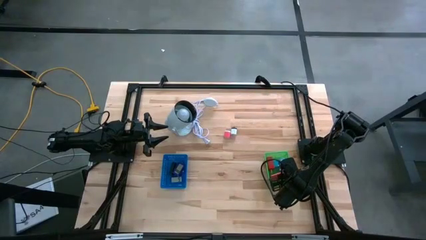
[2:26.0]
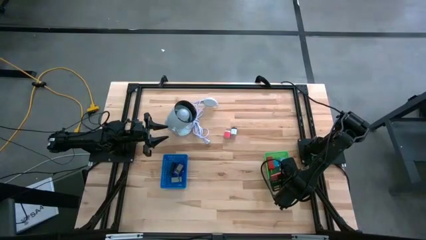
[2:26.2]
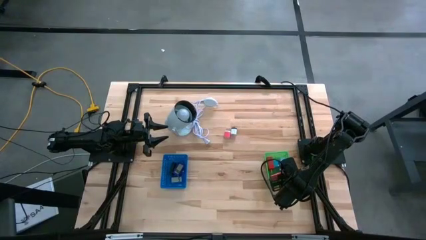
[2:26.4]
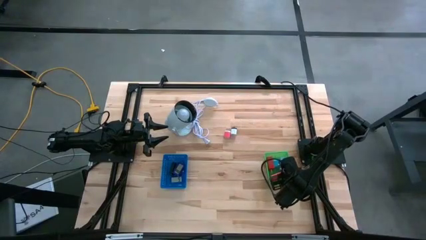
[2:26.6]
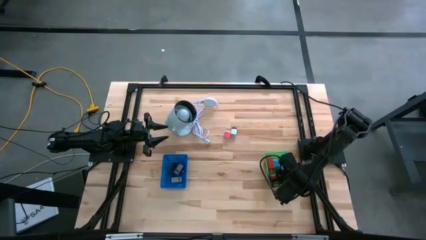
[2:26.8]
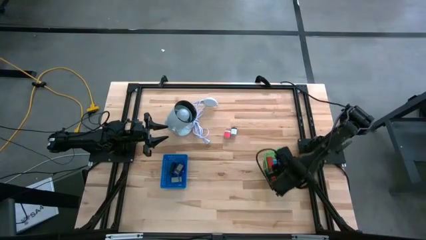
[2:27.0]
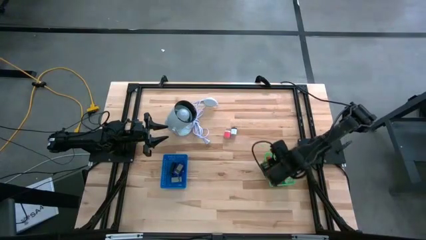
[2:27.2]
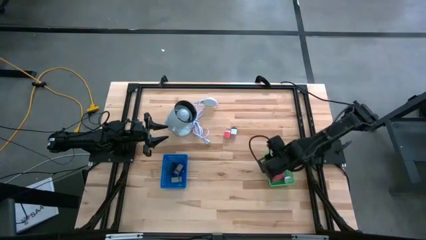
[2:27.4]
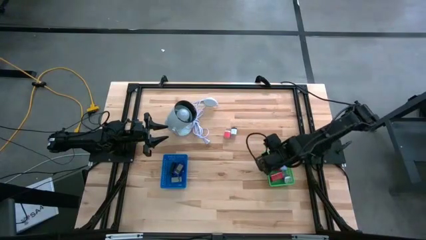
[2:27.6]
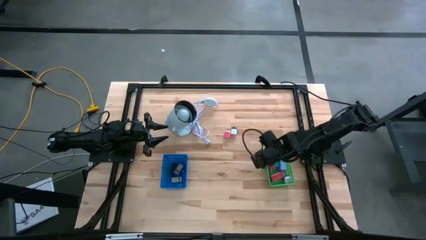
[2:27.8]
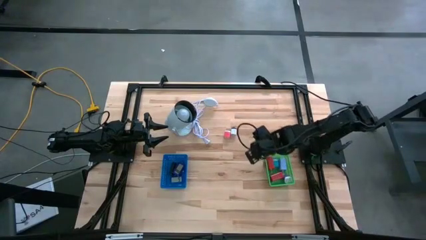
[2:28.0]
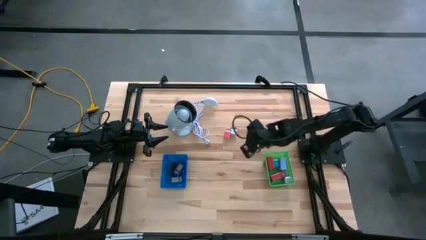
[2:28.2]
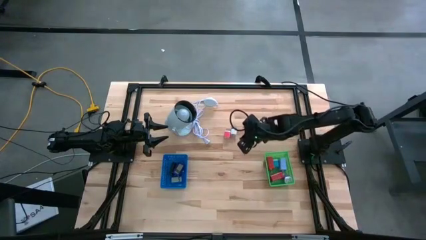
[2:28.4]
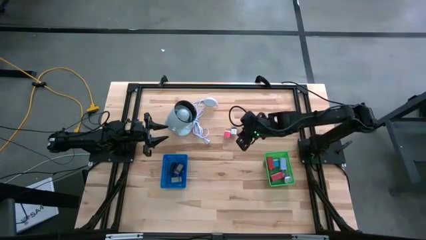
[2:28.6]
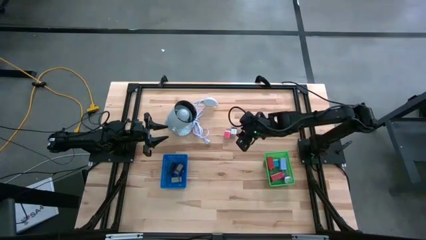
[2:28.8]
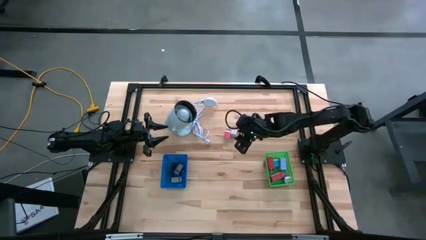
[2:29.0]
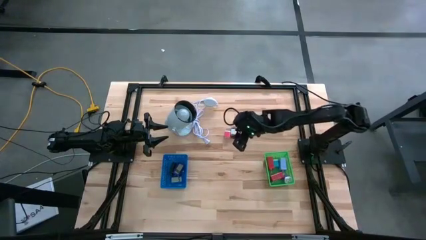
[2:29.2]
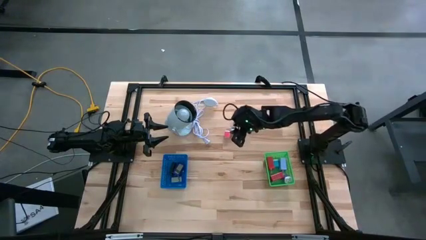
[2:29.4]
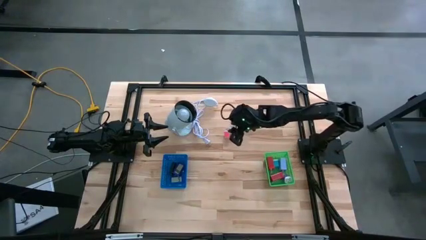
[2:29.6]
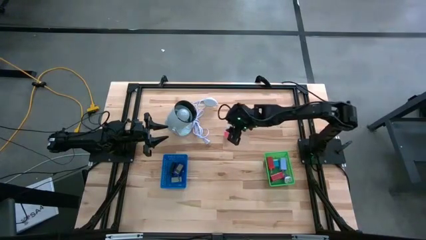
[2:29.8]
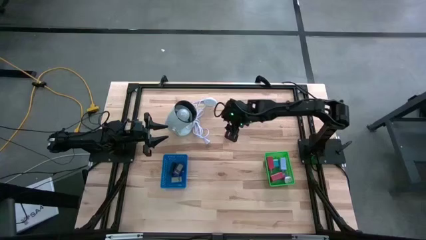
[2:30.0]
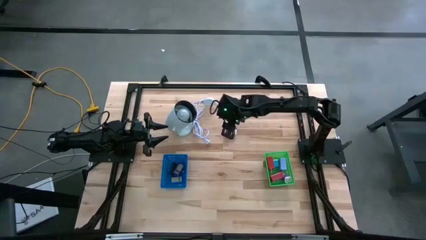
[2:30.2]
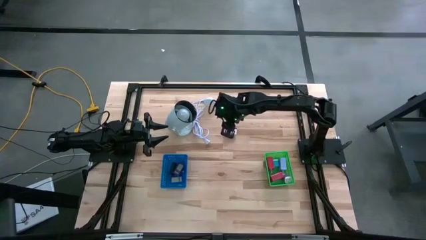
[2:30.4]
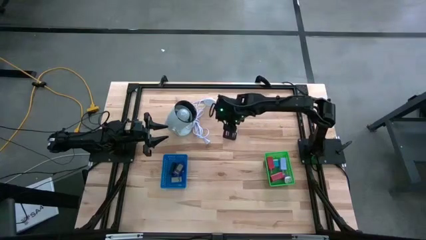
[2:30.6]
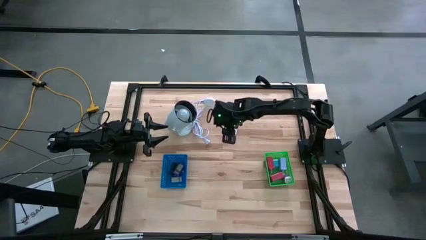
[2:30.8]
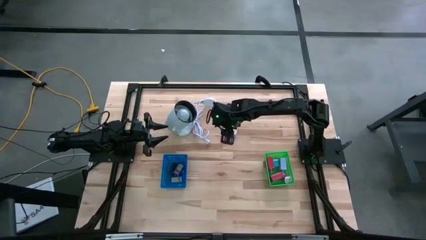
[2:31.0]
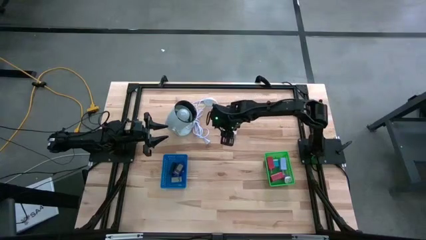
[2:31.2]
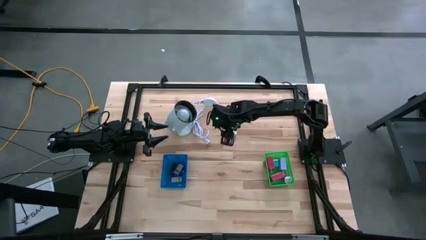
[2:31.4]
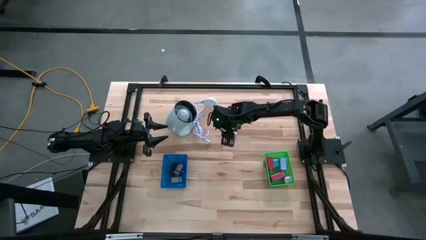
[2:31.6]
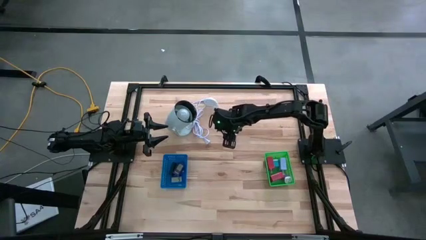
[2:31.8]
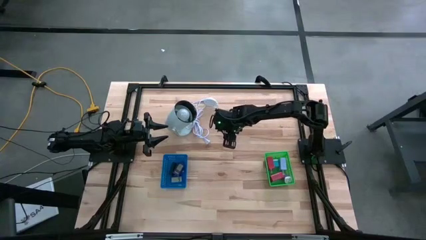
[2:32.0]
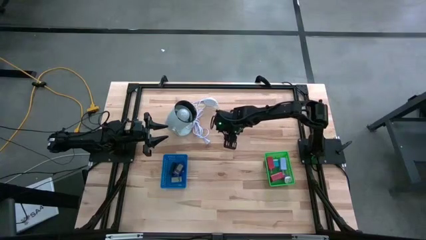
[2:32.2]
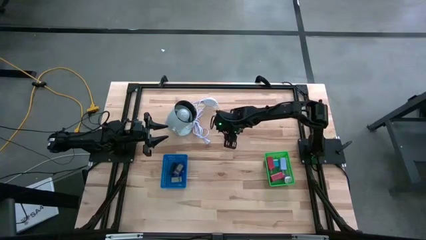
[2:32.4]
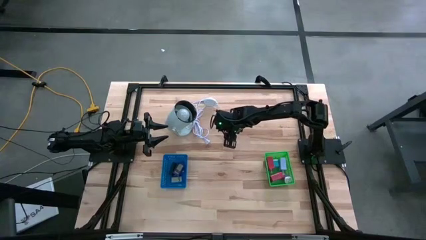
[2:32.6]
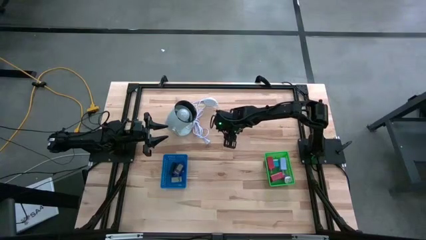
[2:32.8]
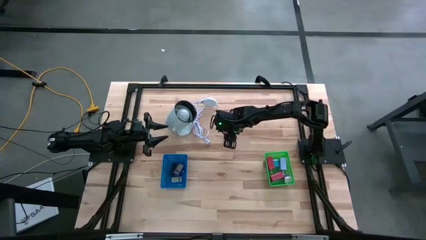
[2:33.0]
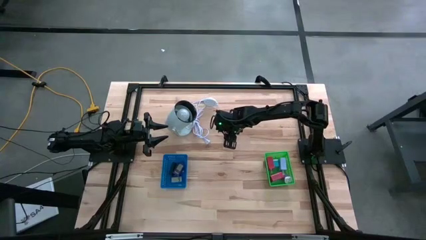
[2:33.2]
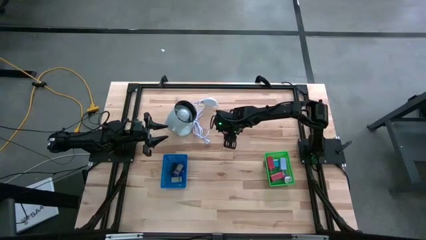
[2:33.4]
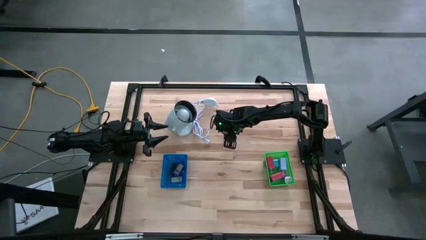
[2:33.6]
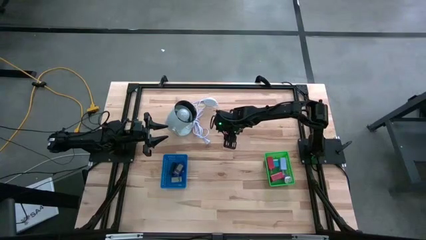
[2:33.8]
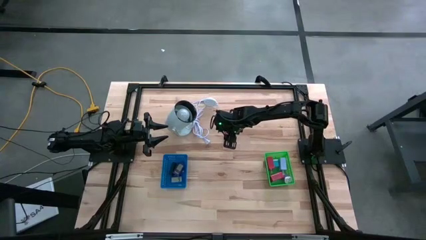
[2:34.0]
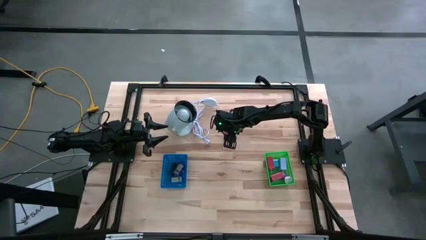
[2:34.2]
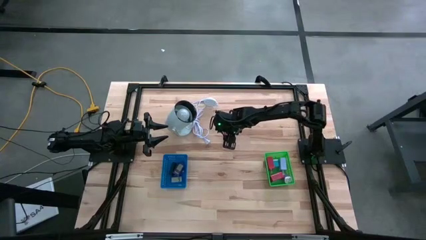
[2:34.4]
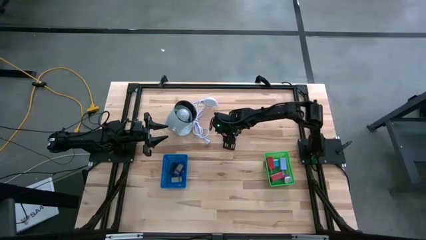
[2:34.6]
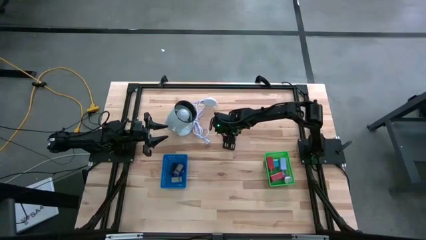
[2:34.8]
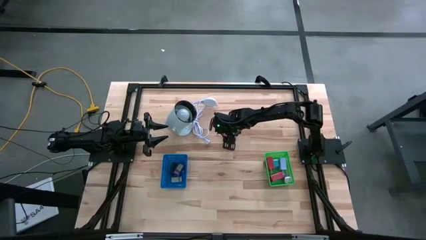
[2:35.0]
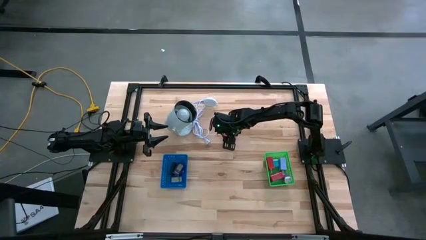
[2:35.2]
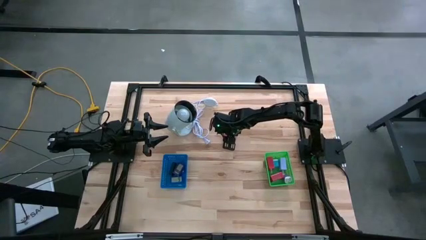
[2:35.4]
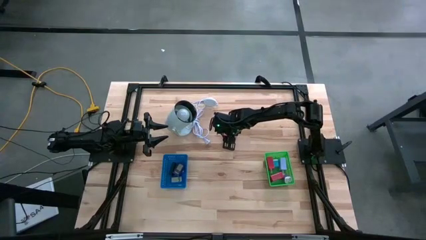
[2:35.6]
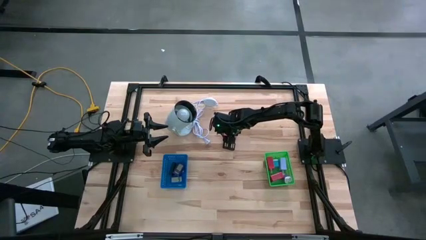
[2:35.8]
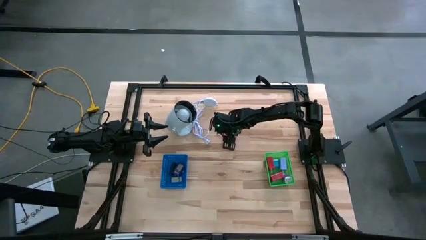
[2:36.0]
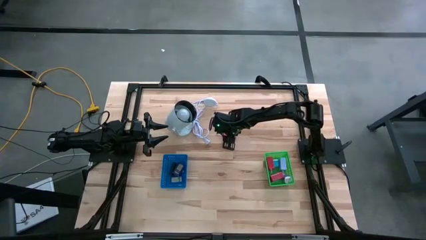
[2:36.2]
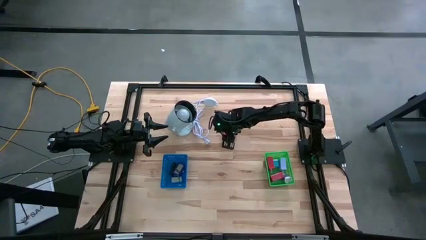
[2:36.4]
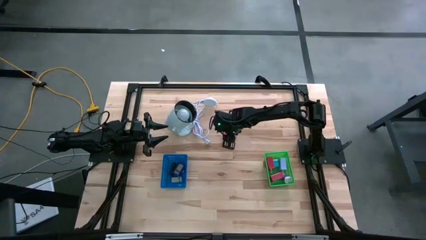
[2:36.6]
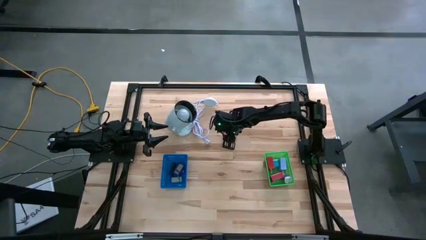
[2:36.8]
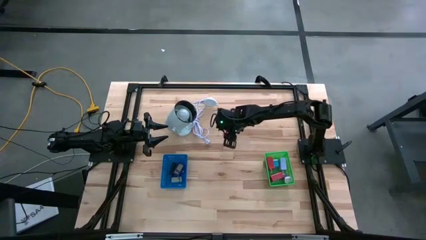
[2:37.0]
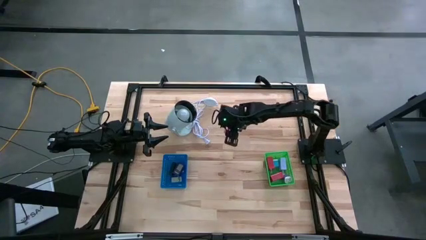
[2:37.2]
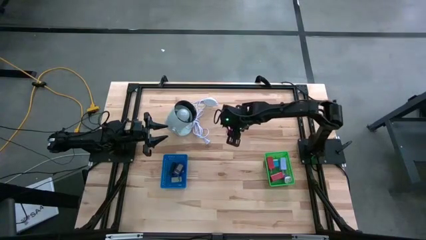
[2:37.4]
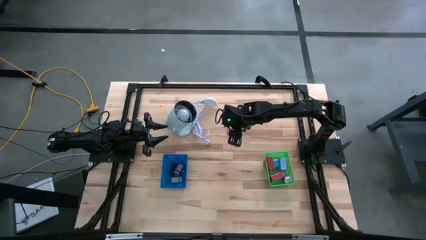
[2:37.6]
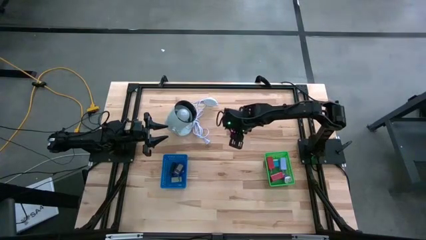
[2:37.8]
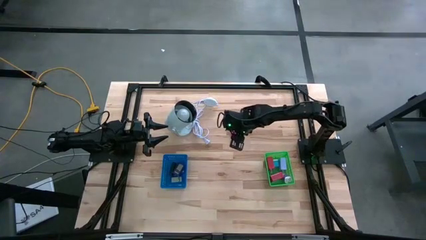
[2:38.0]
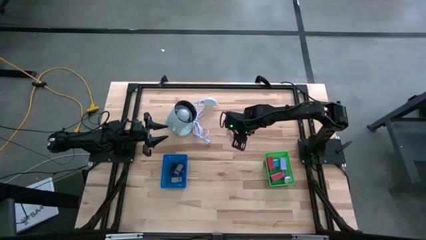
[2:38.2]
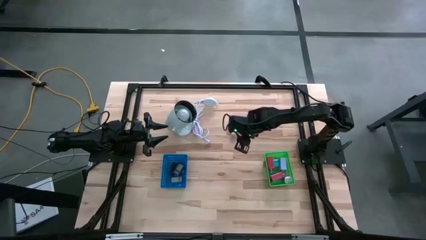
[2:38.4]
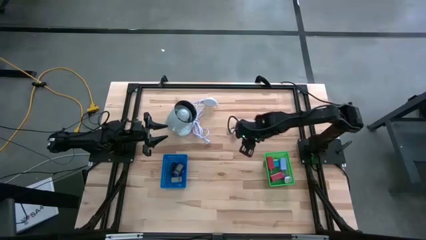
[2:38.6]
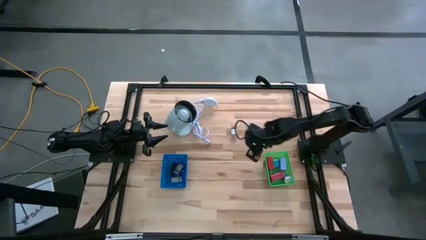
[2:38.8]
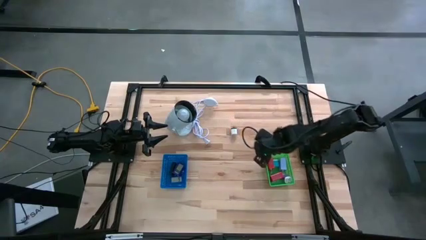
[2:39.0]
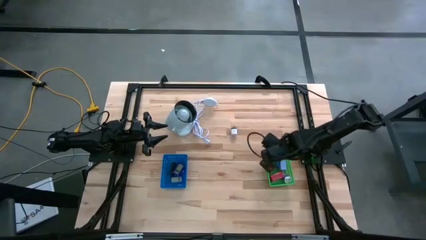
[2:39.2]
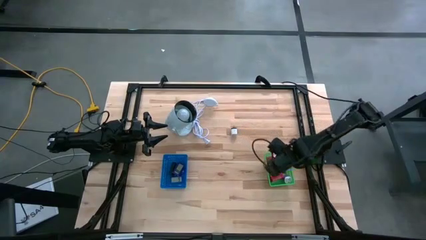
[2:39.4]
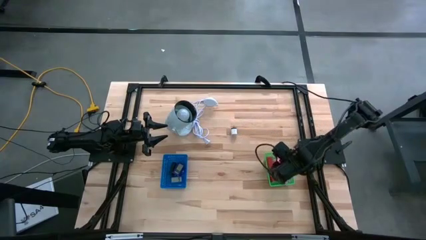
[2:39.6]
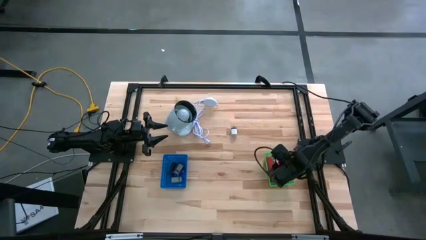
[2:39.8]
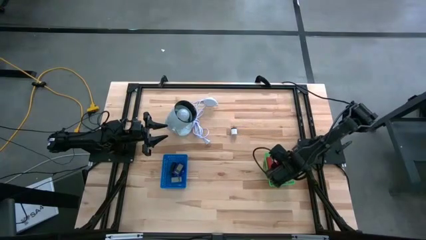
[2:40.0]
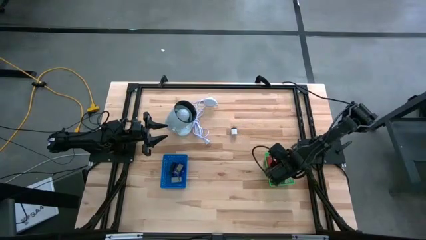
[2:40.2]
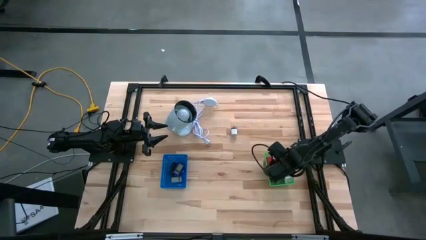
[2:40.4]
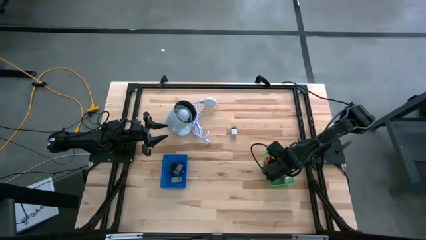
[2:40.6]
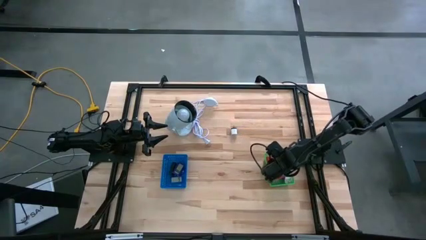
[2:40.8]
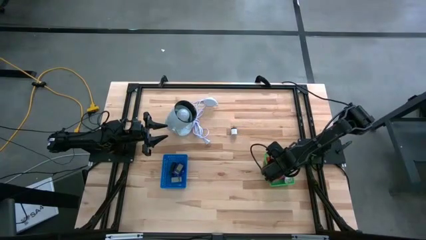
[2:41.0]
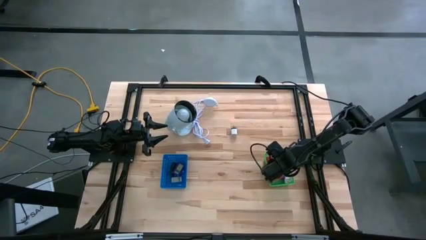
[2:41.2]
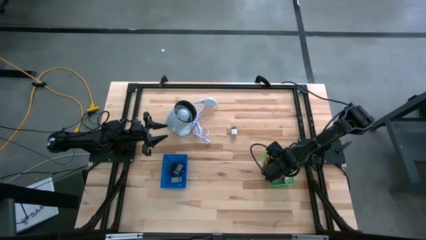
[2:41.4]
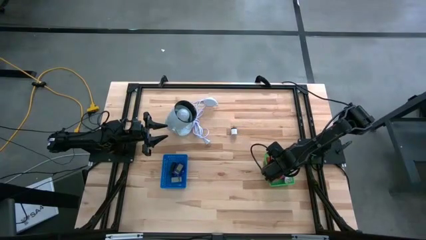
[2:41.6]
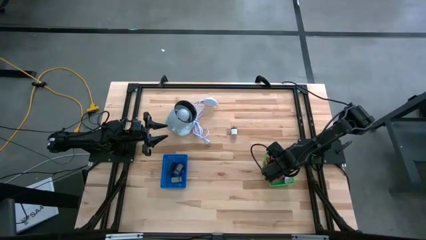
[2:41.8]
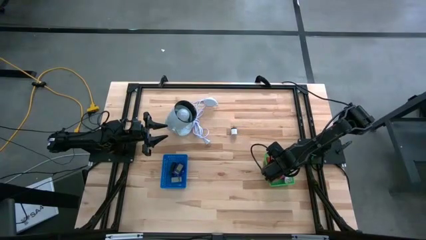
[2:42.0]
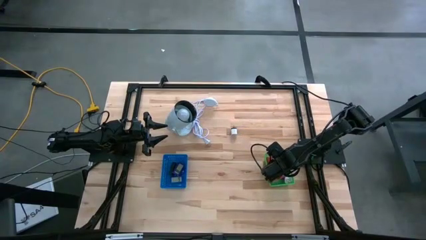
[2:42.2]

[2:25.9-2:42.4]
Task: Pick & Place Office items
Put the pink charger adapter into the green bin
